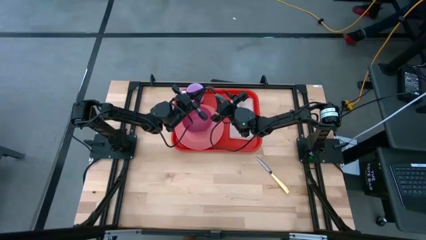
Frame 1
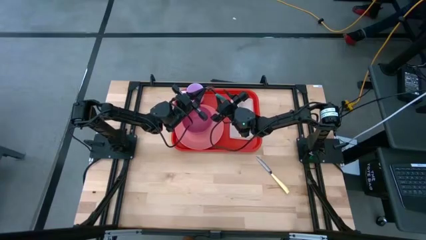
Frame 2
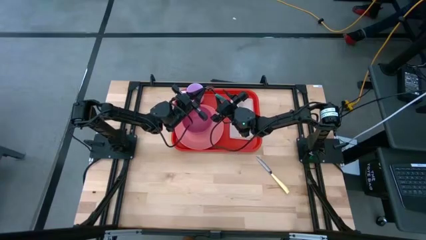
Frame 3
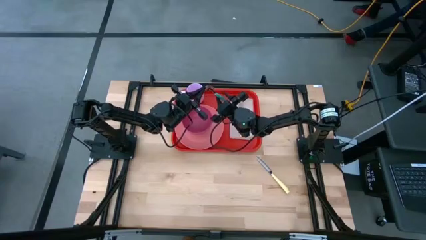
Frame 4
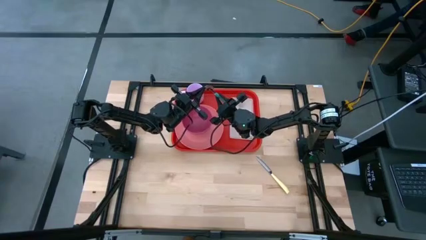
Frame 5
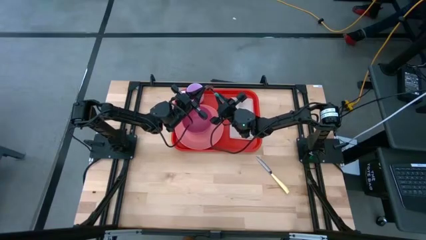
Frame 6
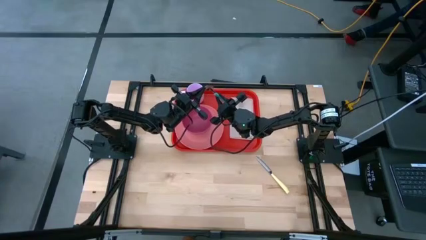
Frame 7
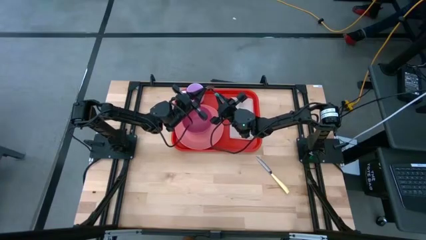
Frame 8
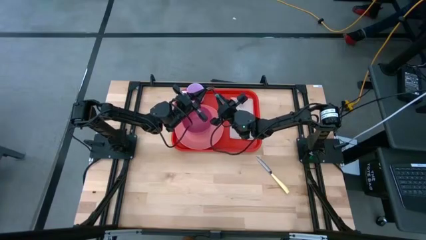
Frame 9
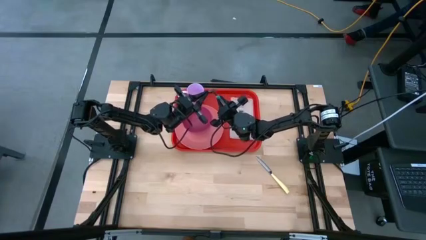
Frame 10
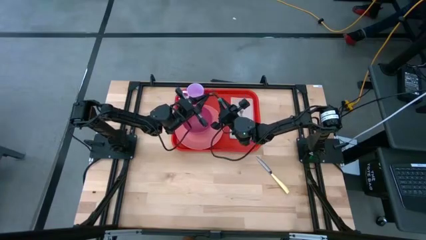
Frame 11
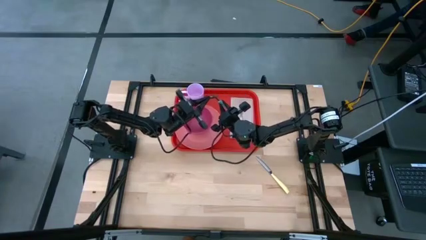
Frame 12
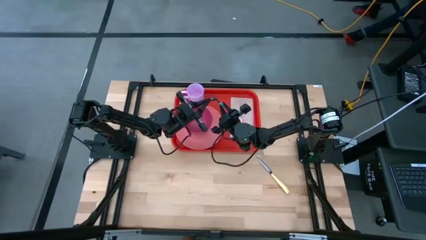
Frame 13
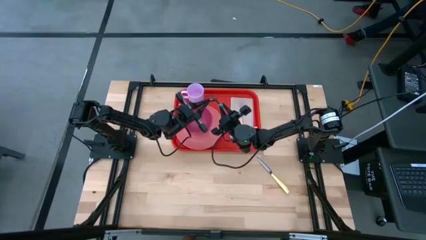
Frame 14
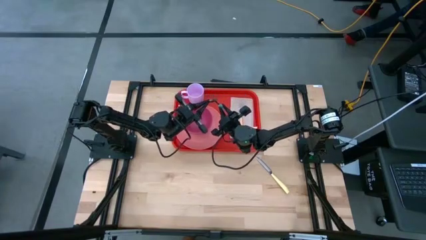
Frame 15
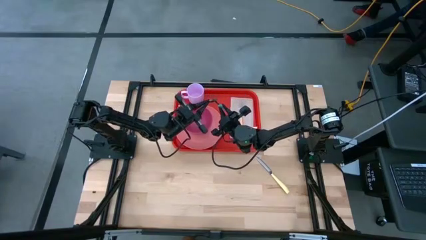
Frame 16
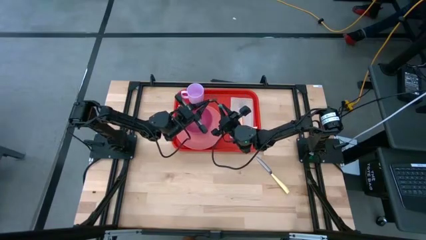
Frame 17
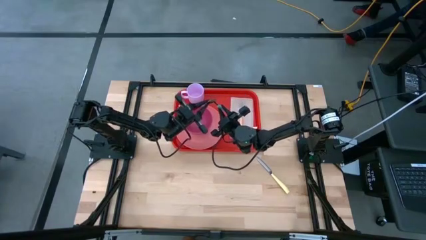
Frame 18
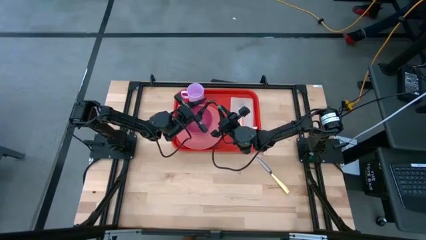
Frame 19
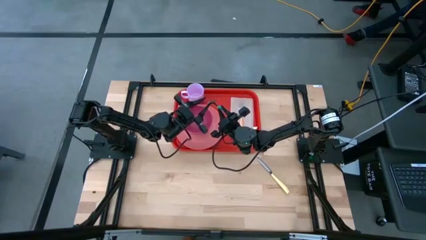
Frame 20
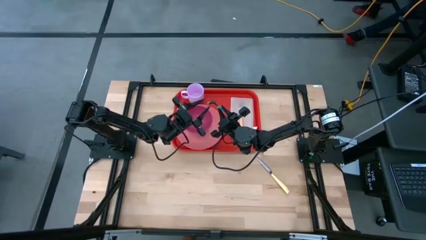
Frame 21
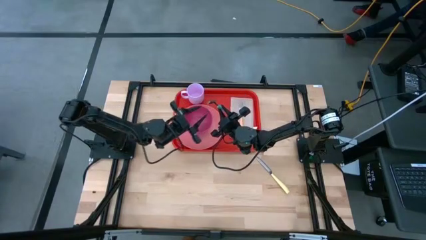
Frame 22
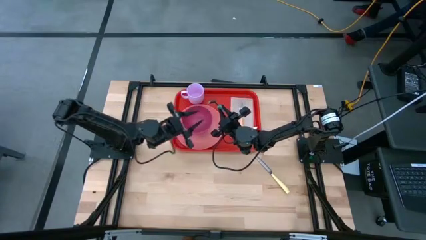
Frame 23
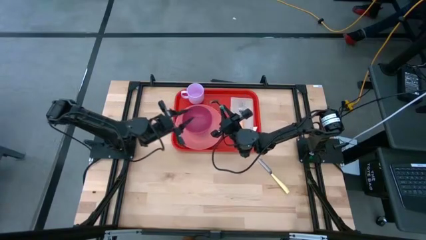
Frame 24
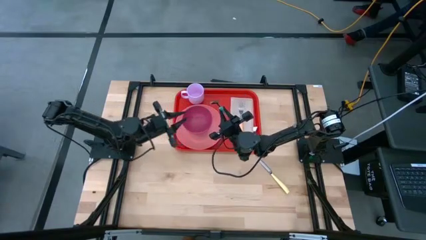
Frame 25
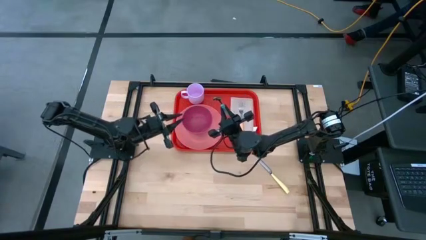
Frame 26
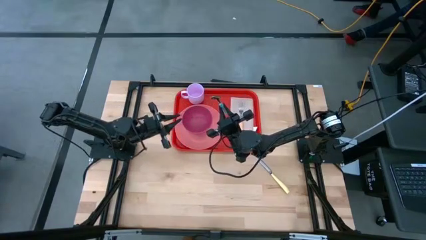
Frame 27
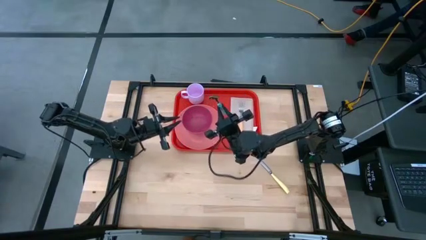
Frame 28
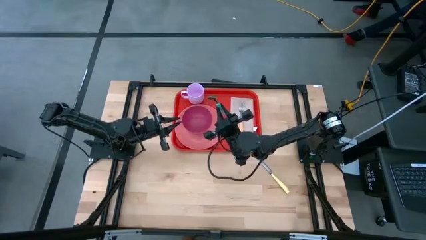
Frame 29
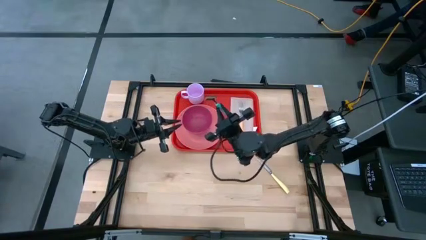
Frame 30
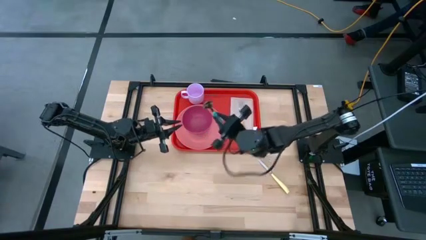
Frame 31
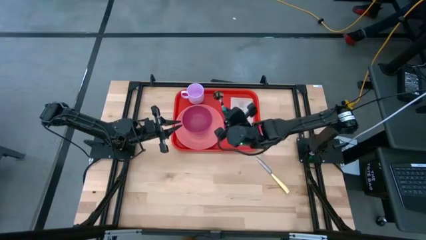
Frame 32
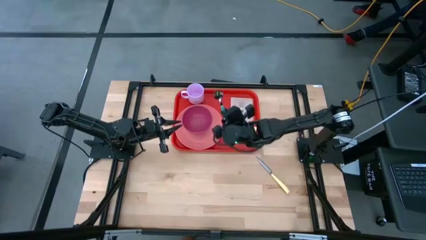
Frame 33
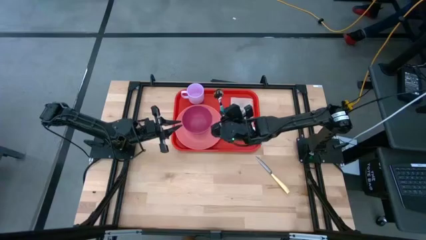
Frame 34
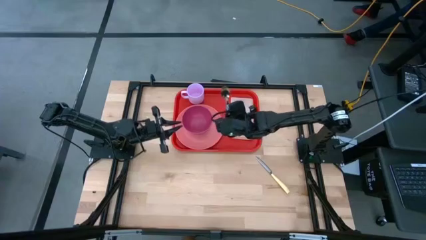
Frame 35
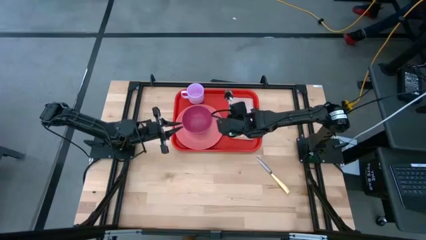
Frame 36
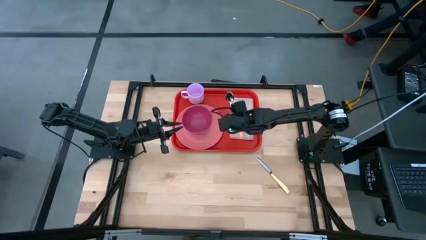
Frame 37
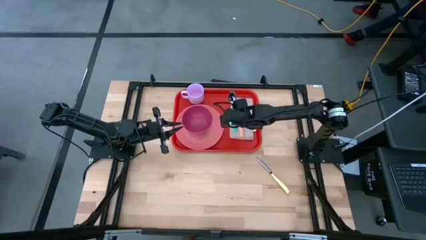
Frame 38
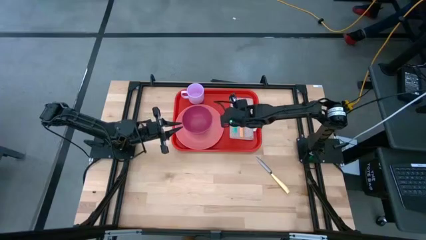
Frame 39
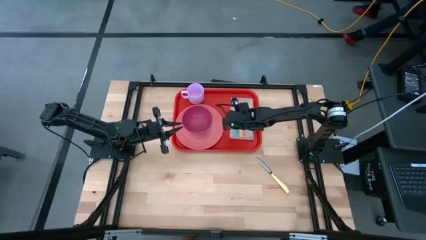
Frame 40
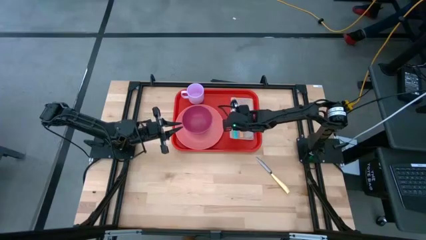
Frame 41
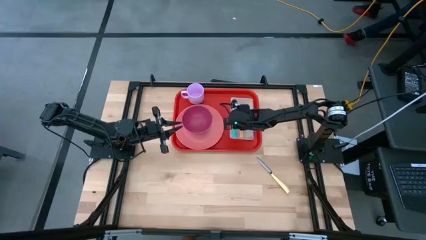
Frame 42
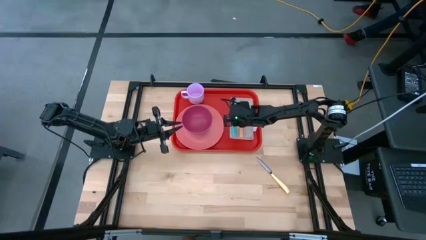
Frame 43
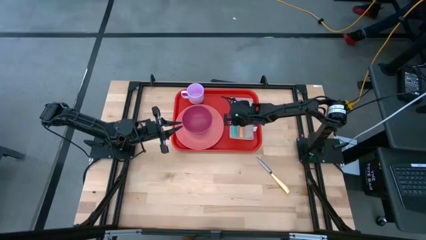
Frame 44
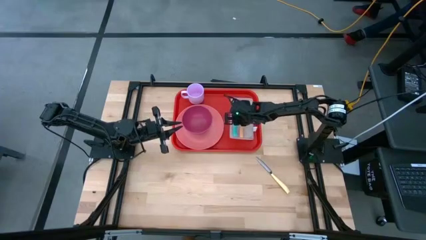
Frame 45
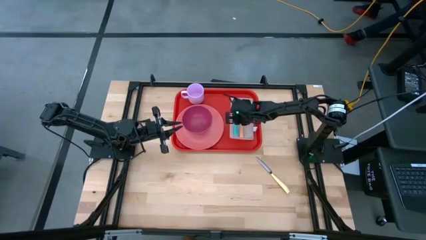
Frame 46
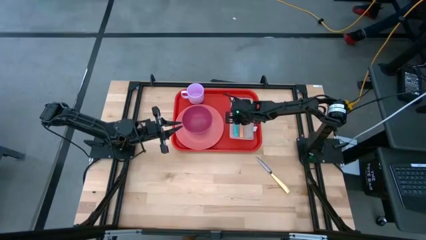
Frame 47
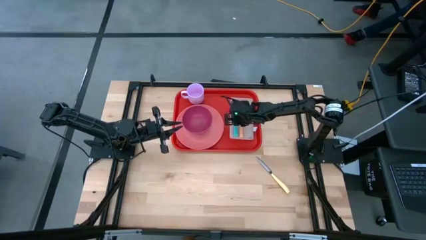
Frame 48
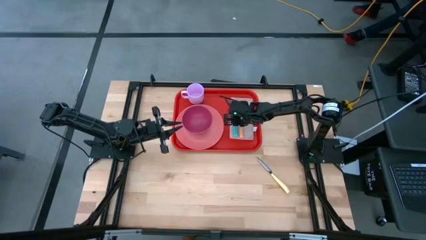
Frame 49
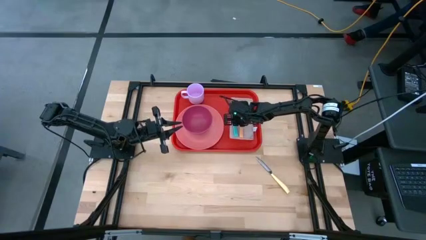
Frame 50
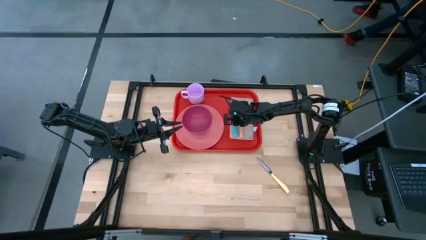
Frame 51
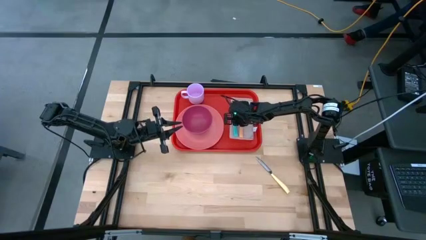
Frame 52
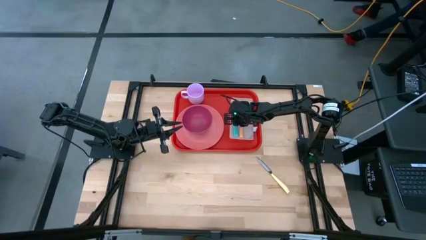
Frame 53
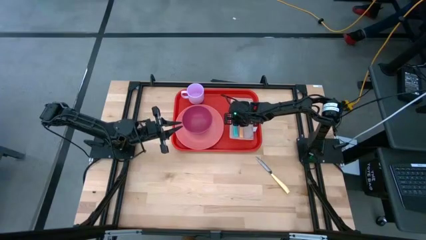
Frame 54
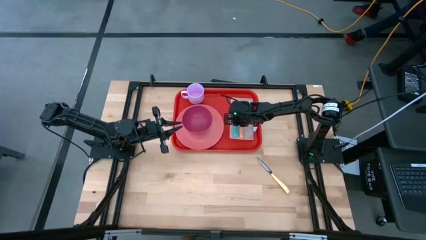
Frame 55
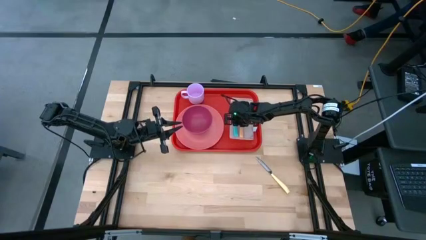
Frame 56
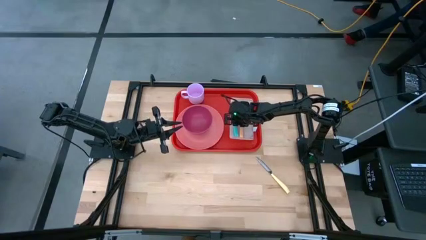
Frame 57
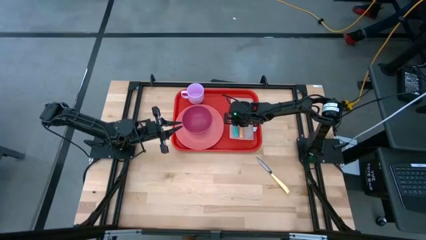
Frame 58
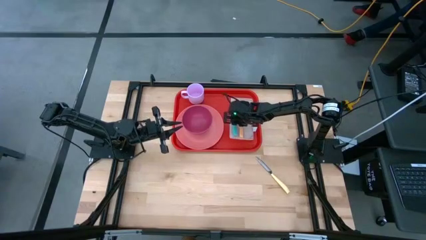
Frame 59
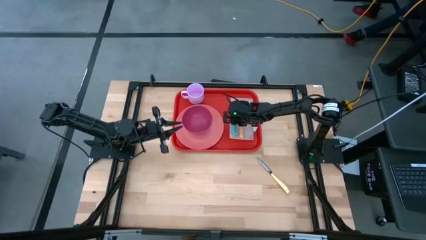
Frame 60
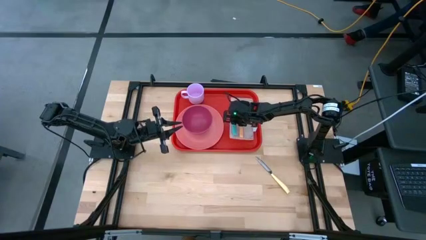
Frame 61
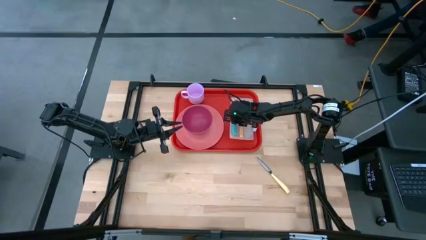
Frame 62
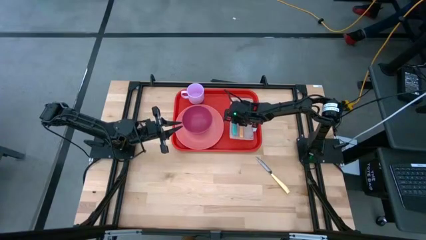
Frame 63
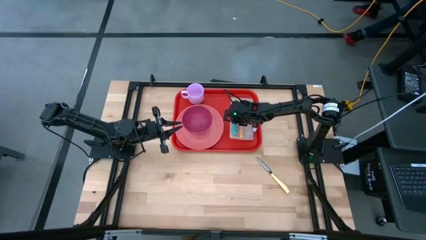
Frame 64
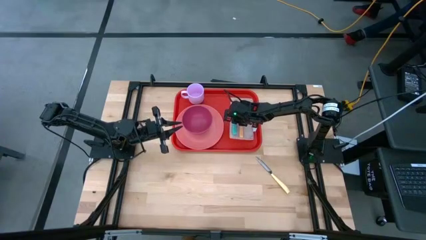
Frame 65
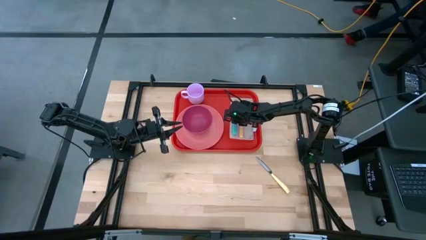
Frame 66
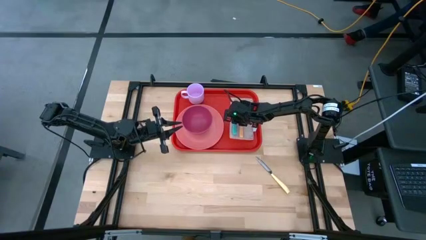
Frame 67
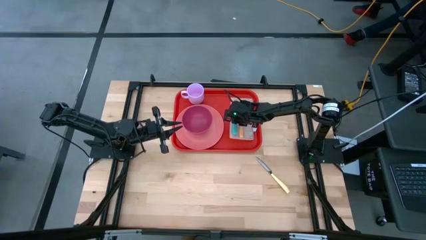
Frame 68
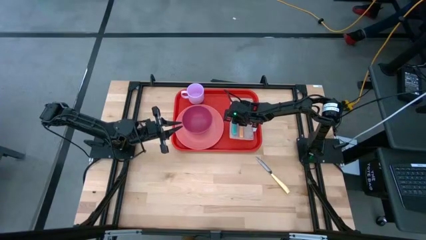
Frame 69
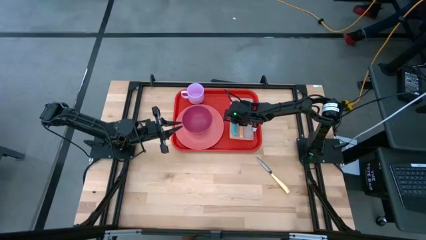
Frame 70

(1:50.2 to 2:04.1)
Task: Set up tray
Put the blue spoon beside the orange fork on the brown napkin

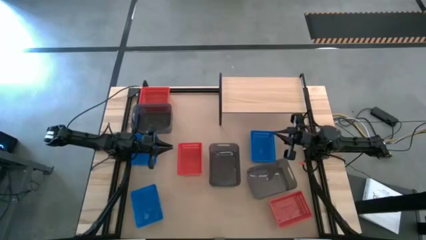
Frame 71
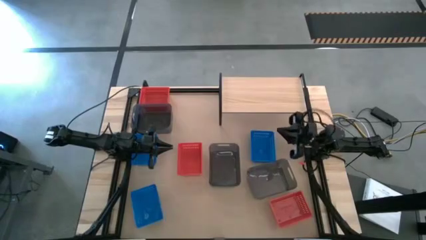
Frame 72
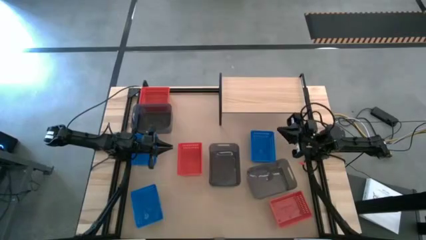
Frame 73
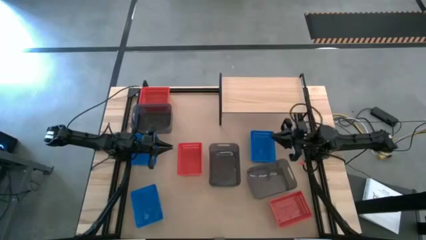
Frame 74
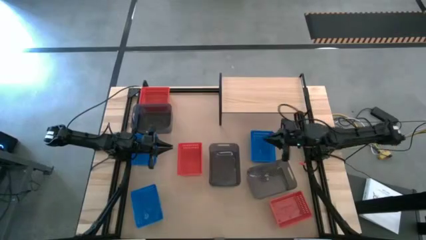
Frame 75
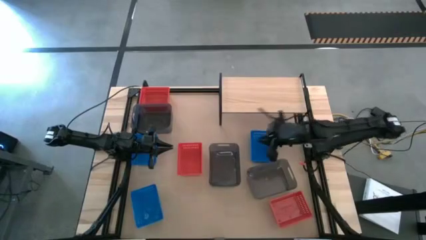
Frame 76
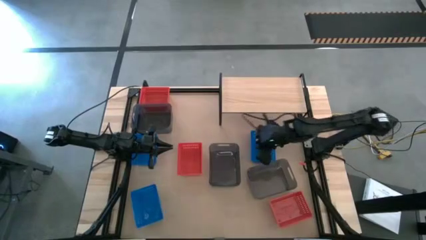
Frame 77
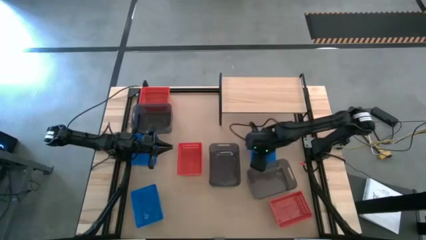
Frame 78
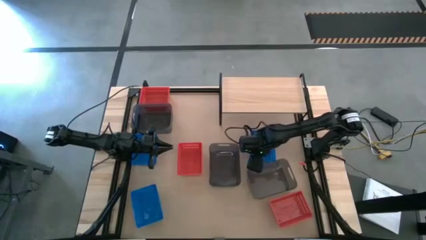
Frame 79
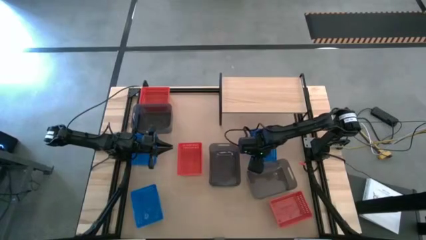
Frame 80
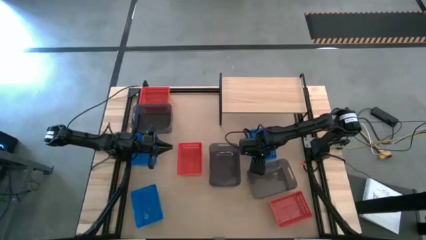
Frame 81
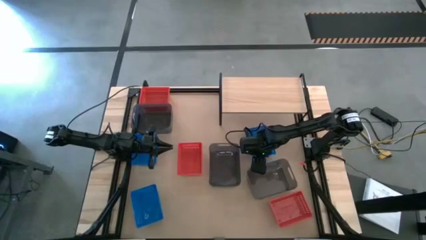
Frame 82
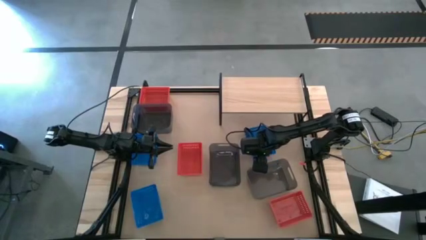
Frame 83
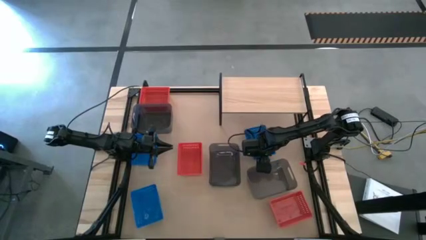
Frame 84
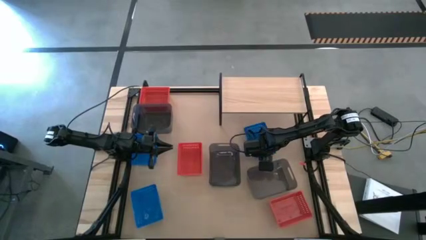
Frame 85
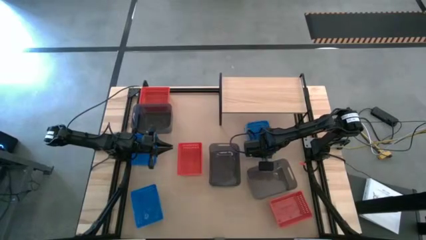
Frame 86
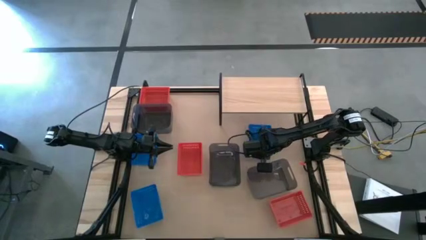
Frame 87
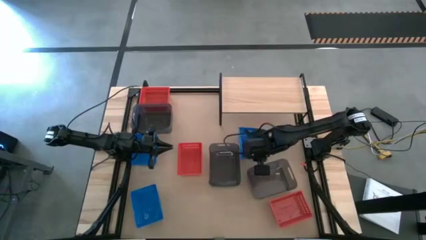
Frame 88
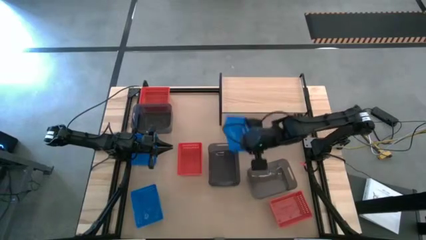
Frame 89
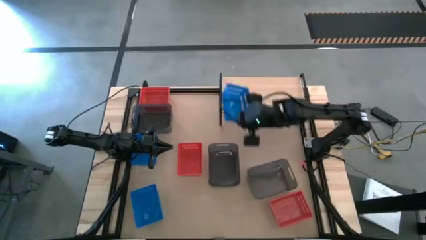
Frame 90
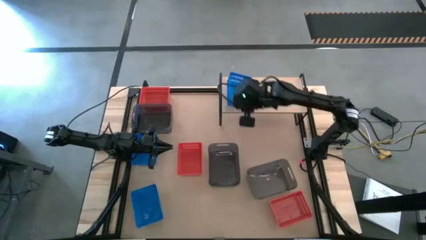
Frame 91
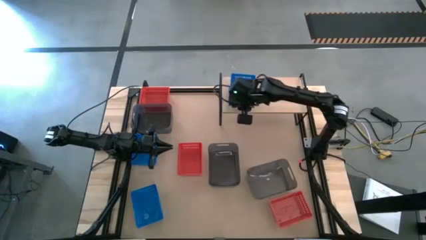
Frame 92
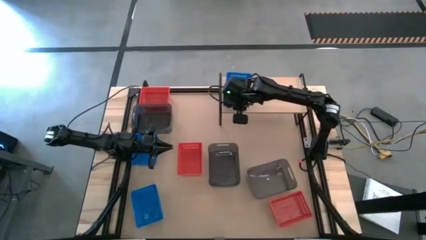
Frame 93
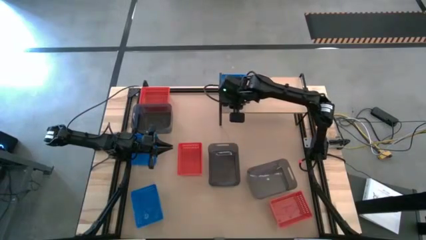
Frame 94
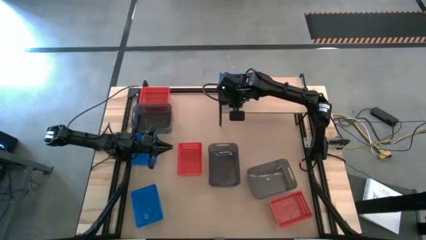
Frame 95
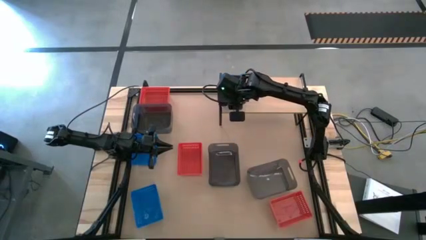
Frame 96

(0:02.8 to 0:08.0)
Task: Stack baskets on shelf by color
Put the top right blue bin on the shelf
